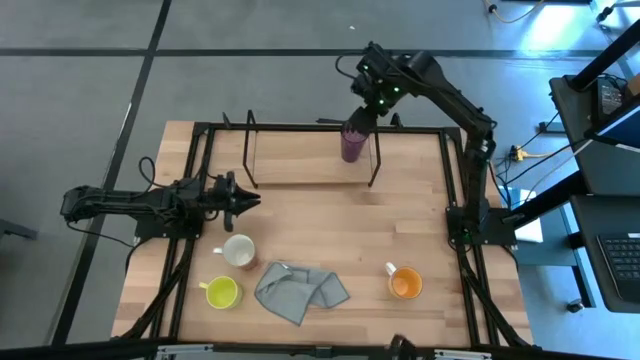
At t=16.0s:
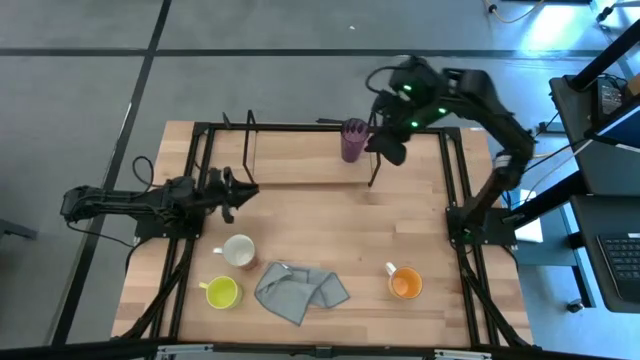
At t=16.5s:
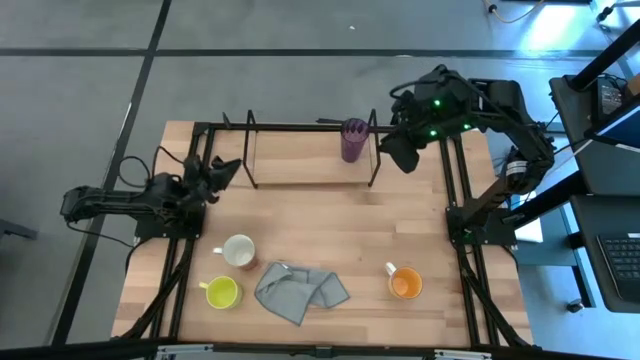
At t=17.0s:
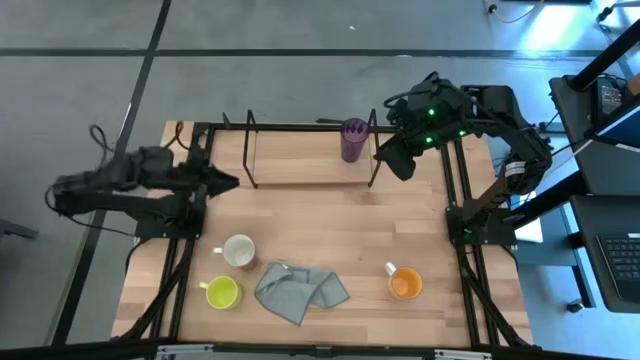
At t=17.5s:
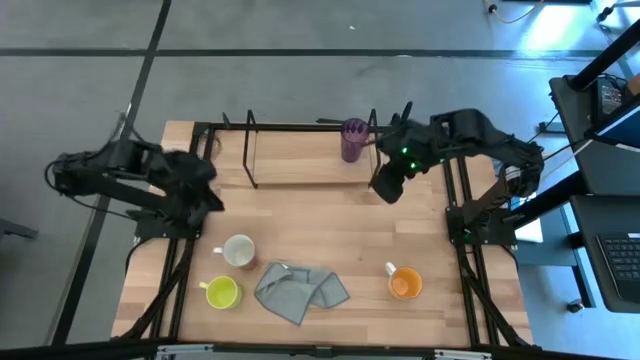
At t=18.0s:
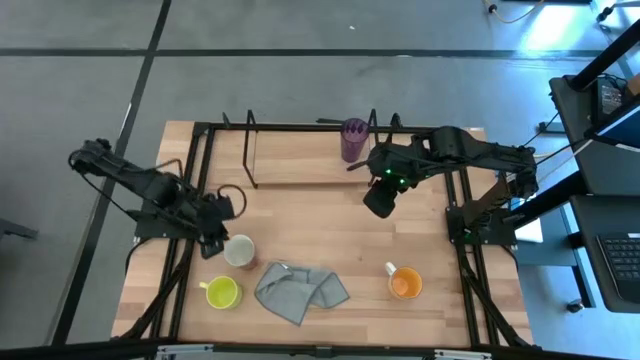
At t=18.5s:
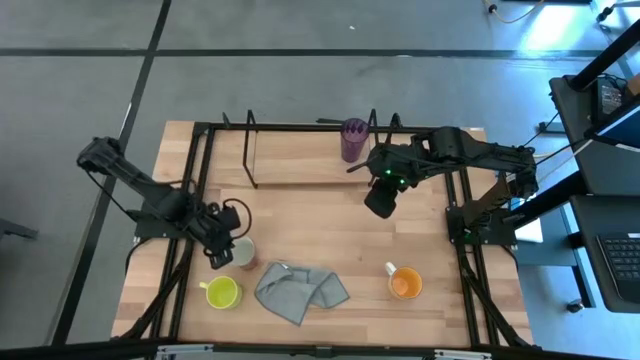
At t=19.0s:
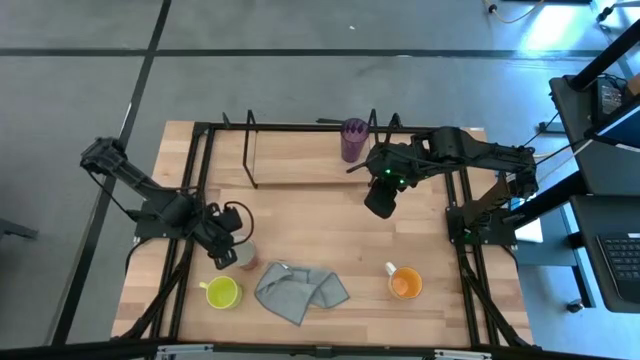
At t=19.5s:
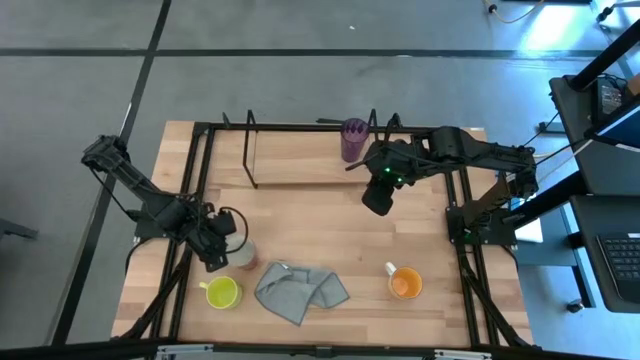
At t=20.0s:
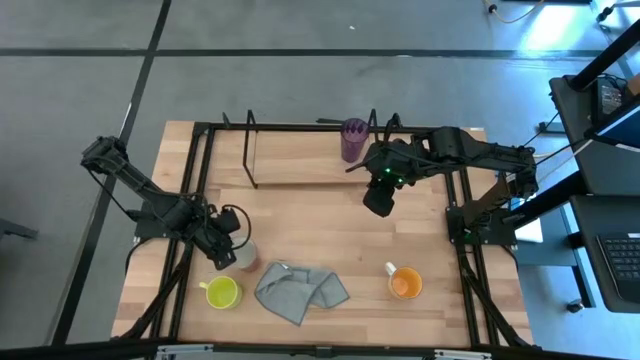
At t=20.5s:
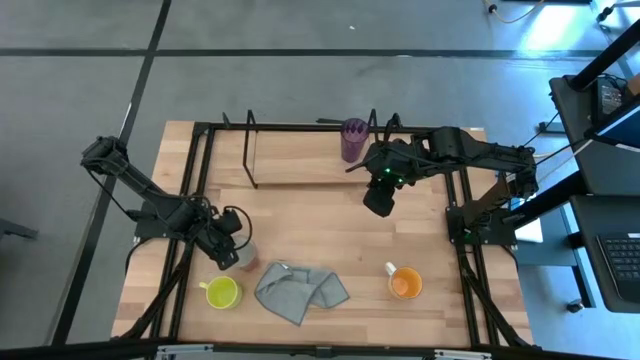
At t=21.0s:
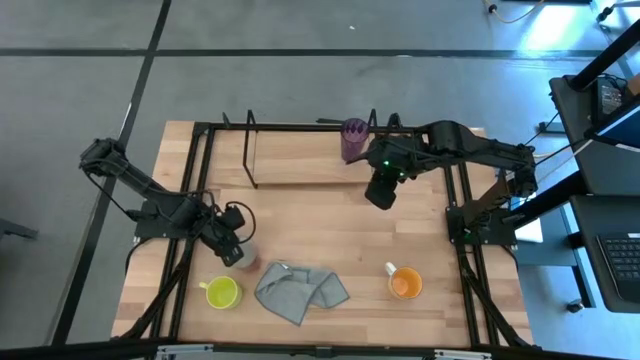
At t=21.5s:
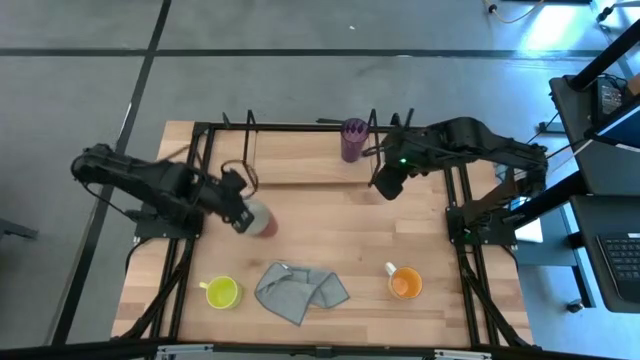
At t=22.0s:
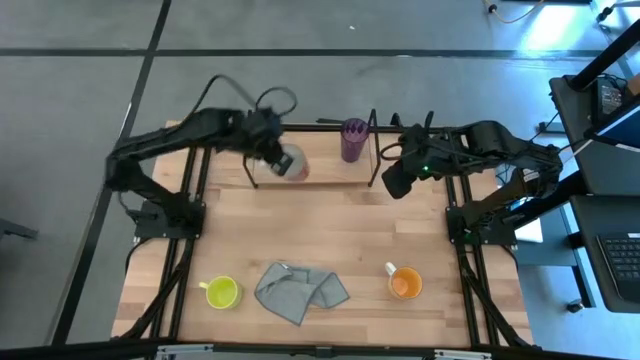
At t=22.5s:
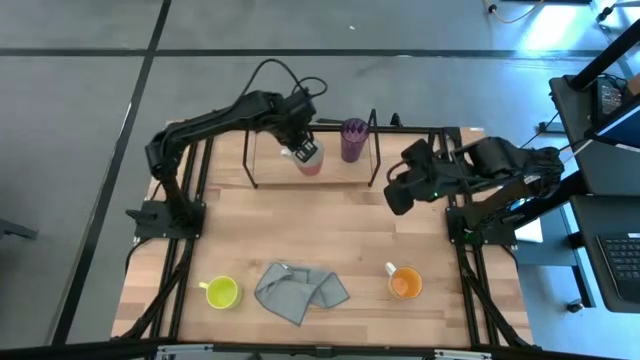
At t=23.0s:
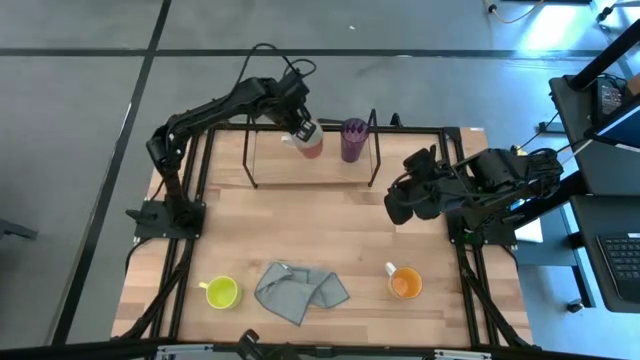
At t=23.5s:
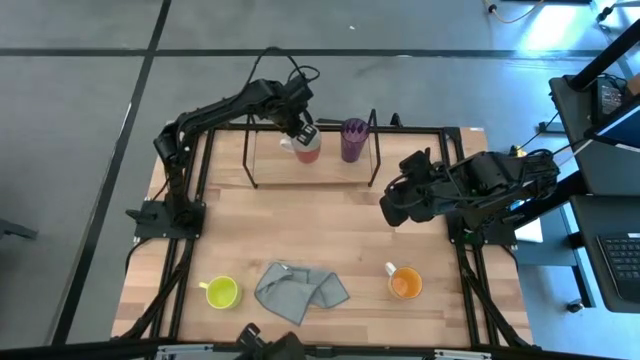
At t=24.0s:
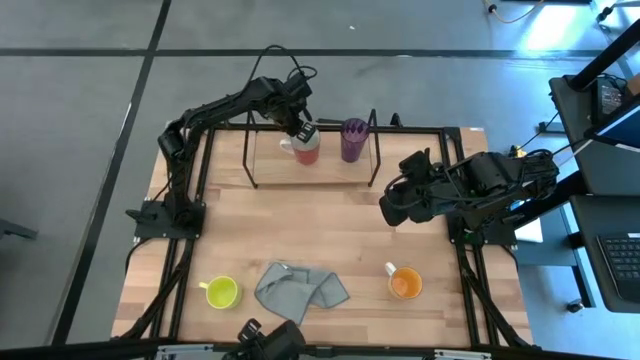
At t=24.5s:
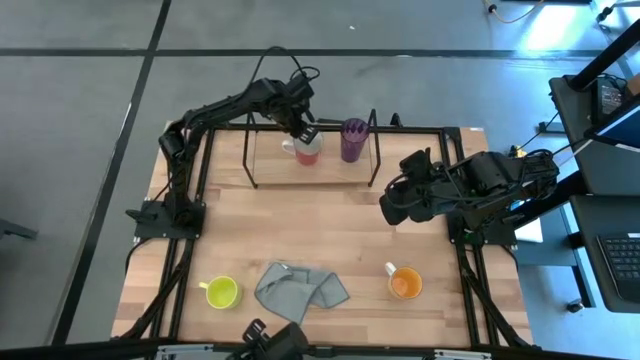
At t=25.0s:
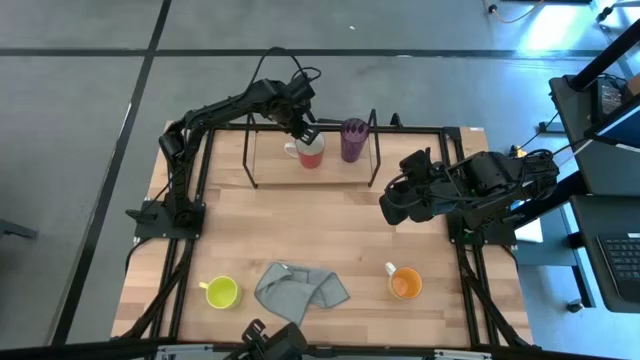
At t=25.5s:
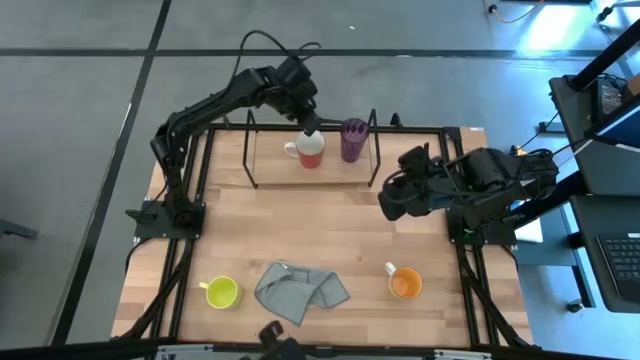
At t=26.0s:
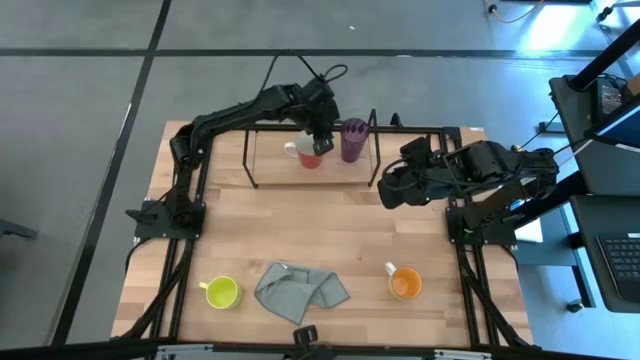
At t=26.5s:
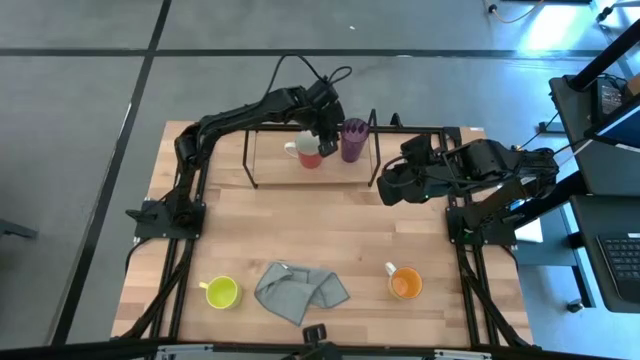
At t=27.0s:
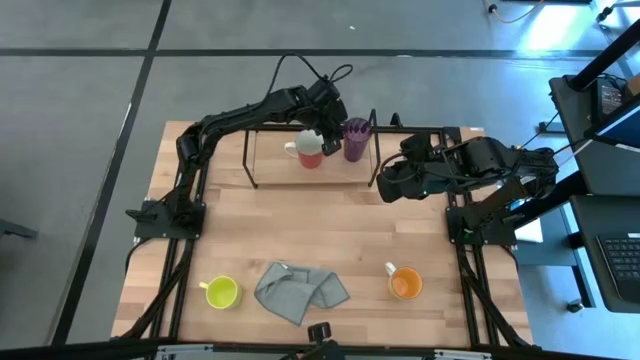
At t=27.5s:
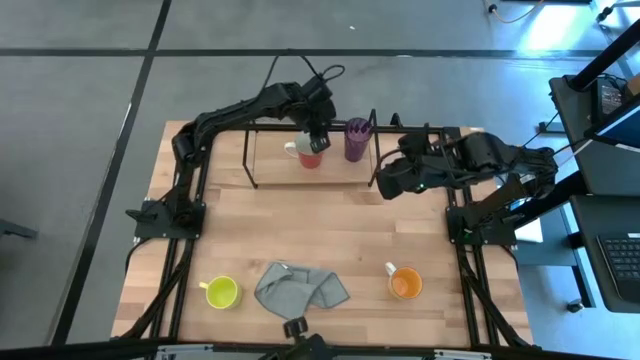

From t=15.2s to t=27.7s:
Task: Stack small to large cups/mugs on shelf
Put the orange mug on the shelf

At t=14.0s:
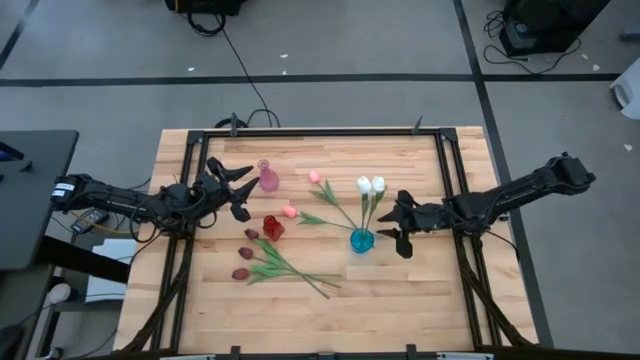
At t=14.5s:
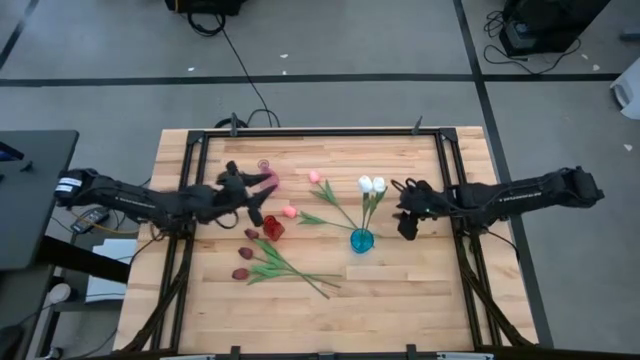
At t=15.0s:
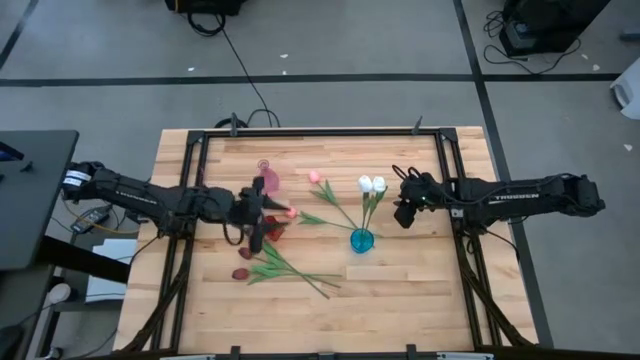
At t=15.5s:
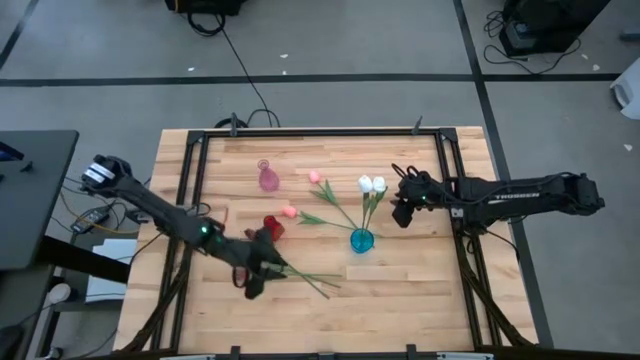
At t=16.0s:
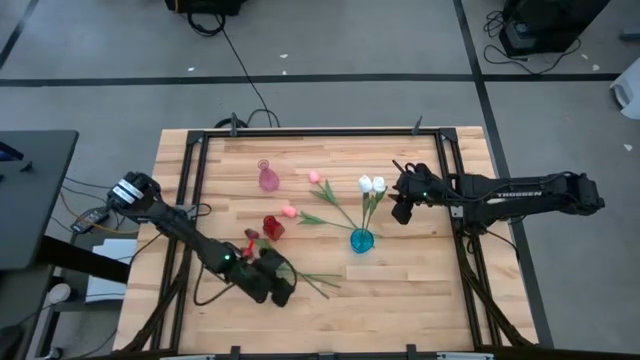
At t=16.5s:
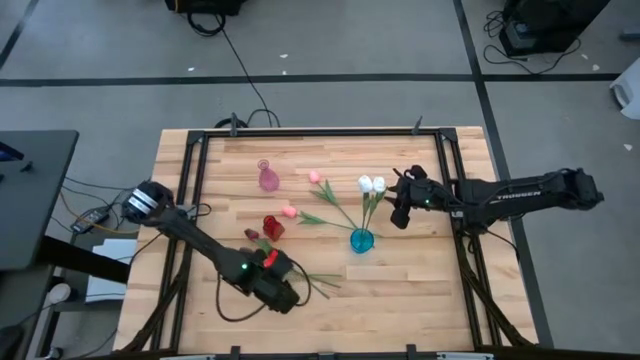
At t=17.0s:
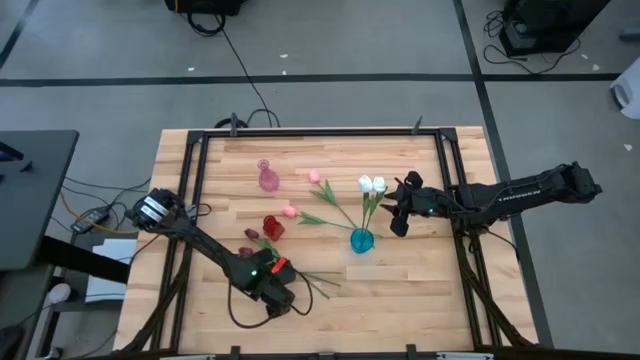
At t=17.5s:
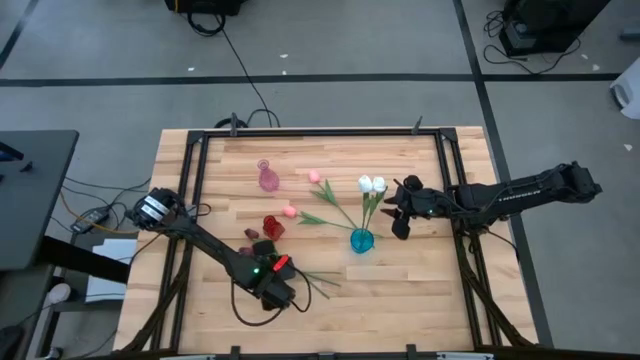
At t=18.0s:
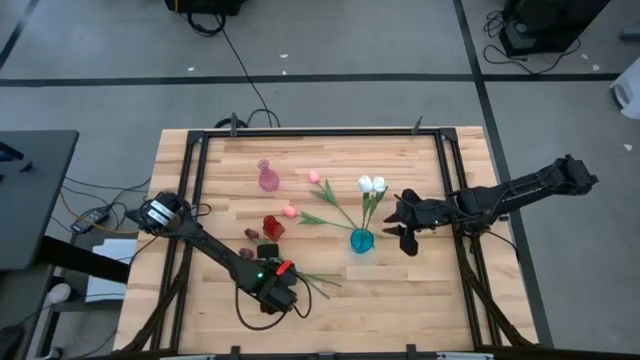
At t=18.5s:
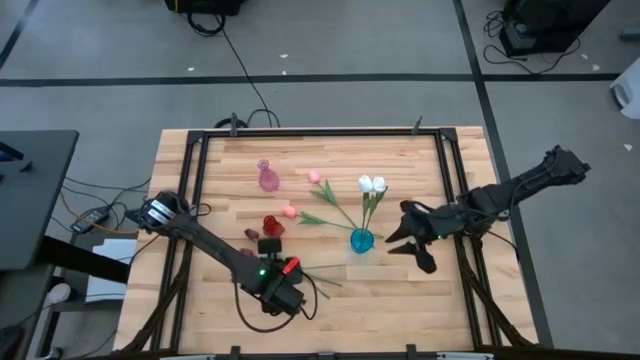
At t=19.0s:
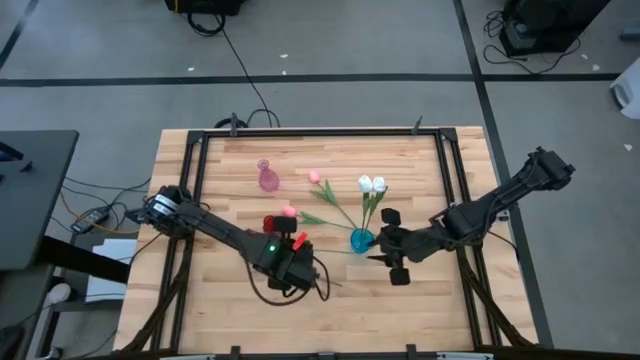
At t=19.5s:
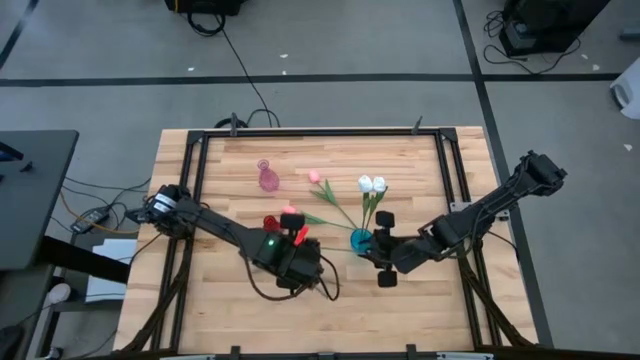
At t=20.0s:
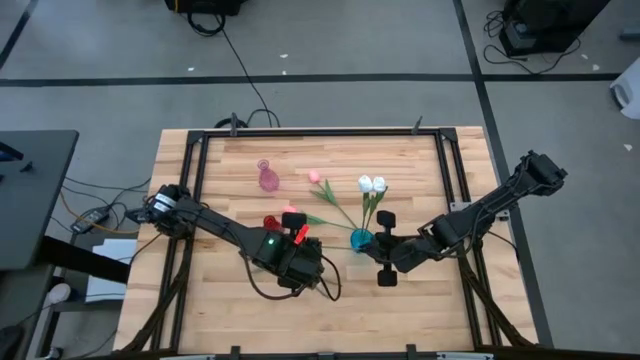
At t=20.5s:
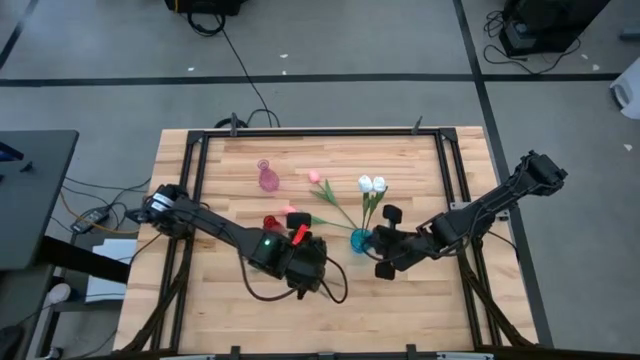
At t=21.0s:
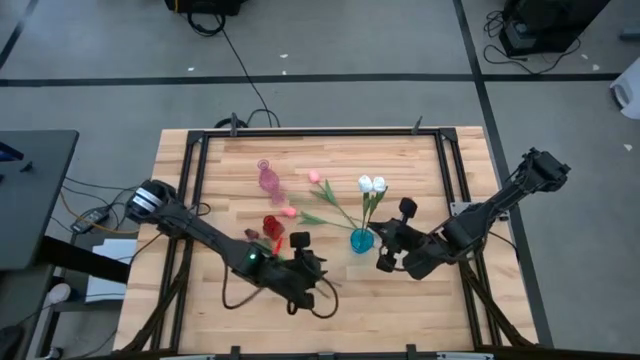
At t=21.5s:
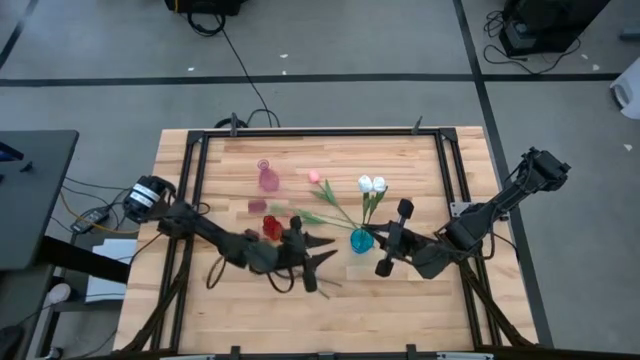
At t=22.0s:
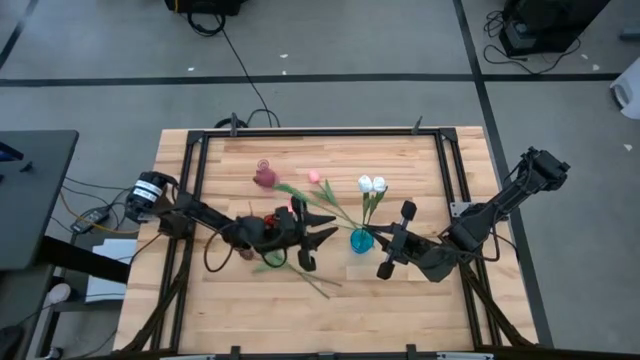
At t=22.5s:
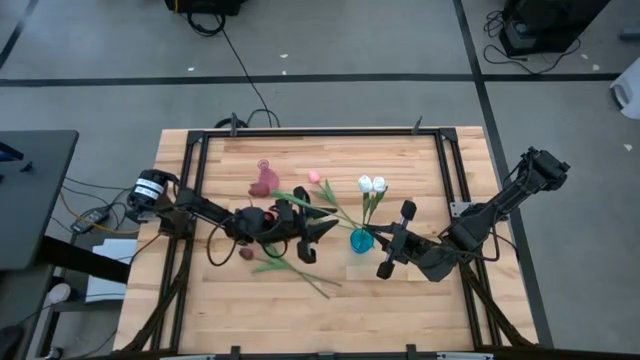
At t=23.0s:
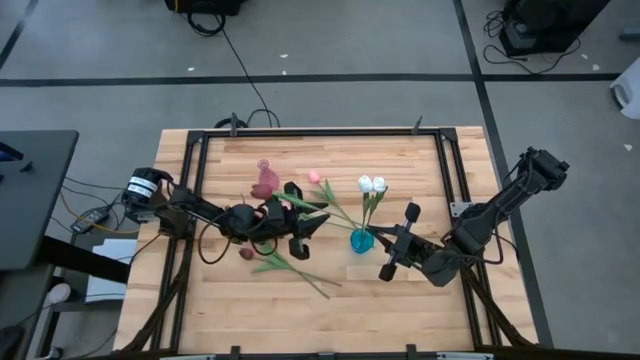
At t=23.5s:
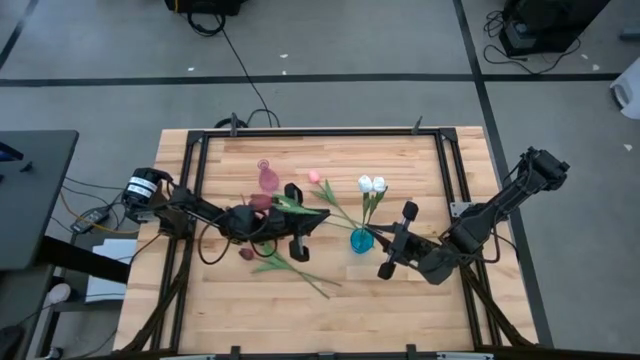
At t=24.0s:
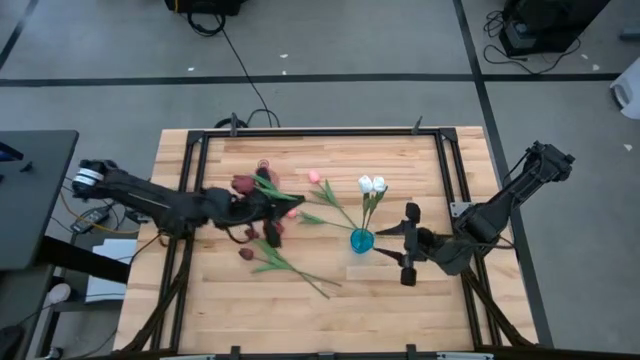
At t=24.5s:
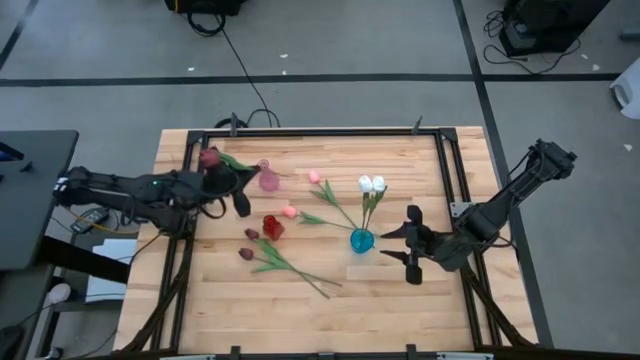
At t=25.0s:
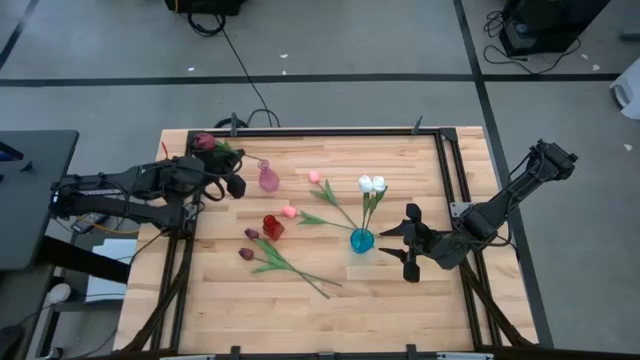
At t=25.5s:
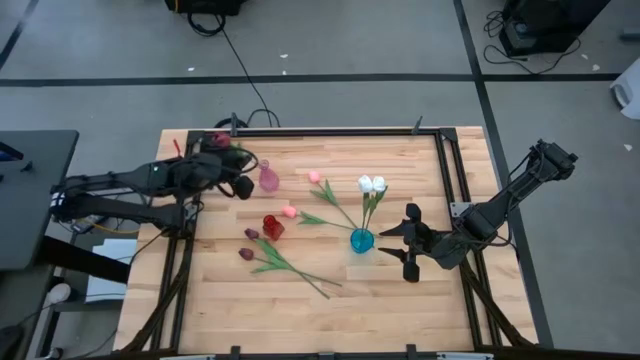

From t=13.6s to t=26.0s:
Task: Sort flowers into vase by color
Put the top red tulip into the pink vase
